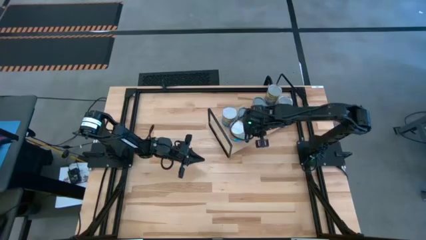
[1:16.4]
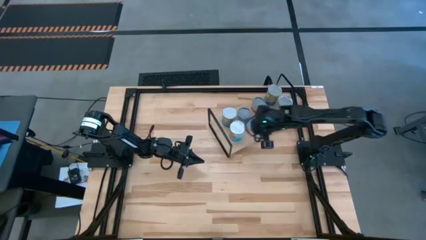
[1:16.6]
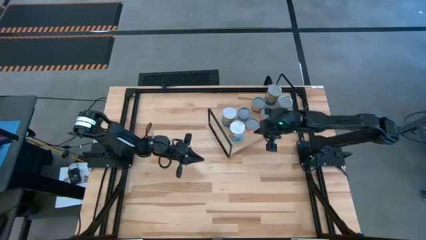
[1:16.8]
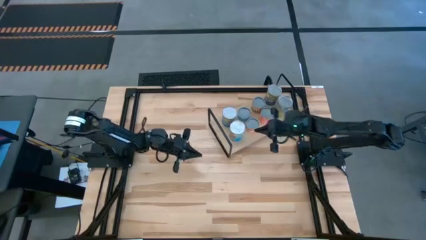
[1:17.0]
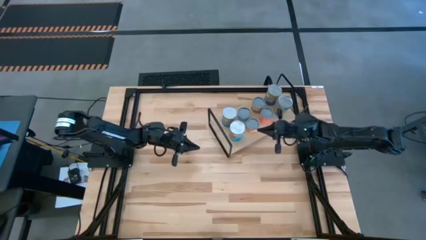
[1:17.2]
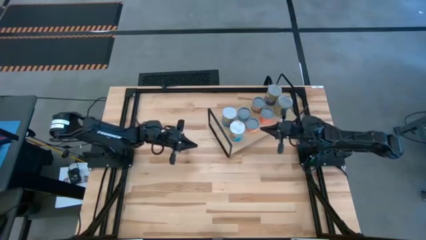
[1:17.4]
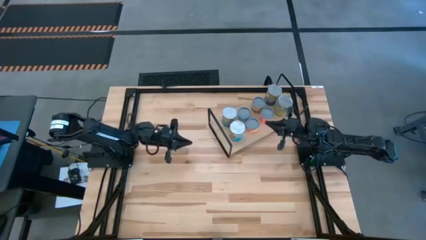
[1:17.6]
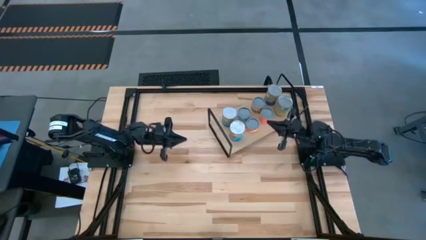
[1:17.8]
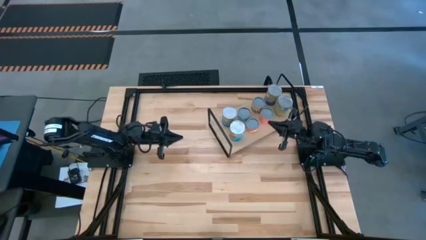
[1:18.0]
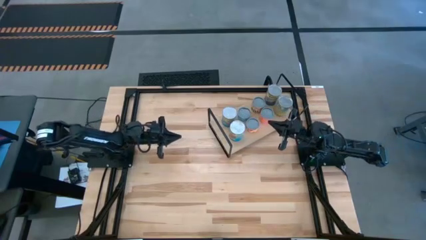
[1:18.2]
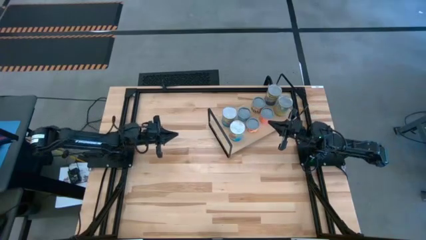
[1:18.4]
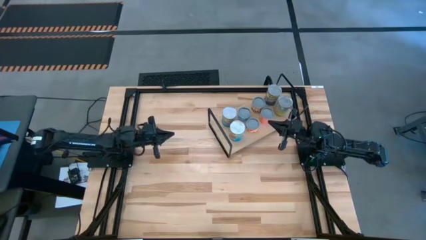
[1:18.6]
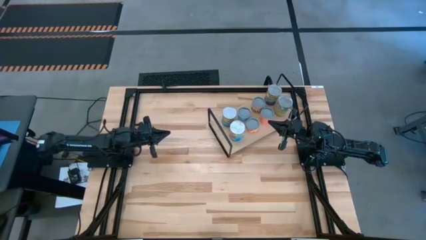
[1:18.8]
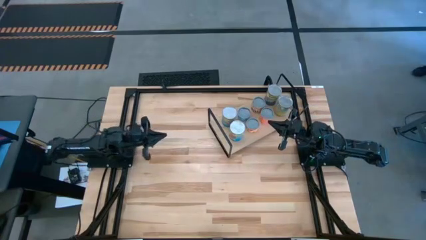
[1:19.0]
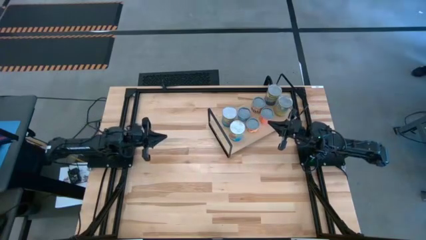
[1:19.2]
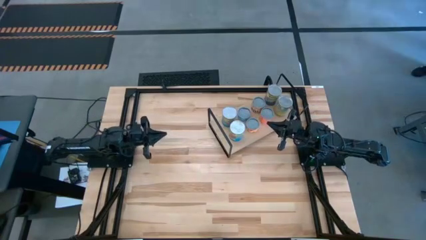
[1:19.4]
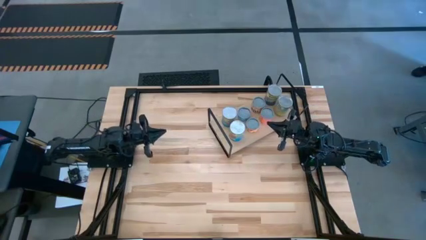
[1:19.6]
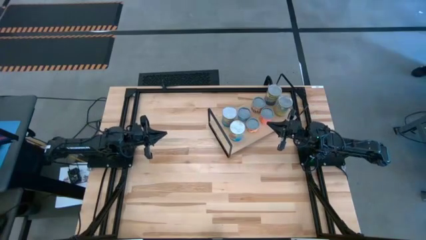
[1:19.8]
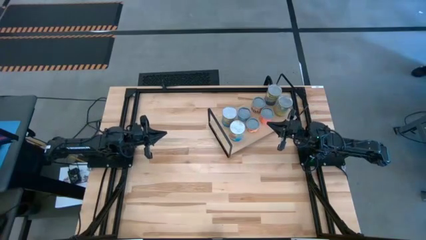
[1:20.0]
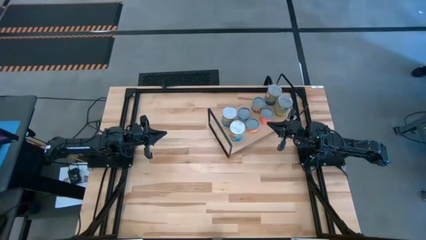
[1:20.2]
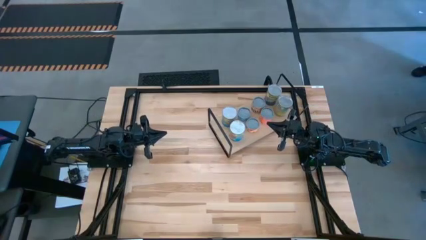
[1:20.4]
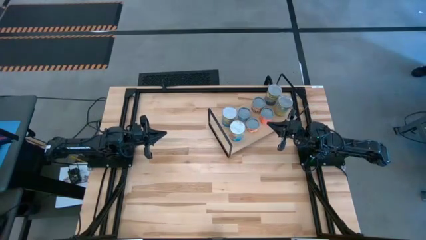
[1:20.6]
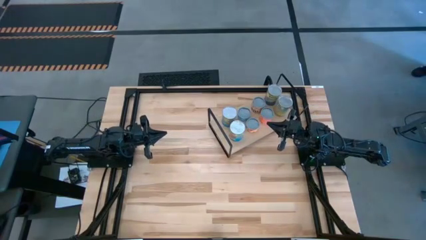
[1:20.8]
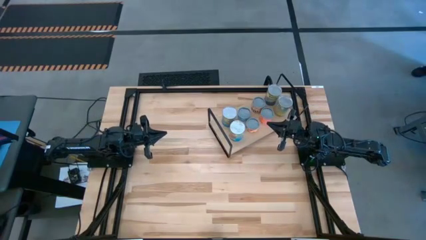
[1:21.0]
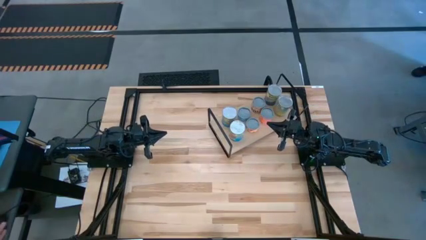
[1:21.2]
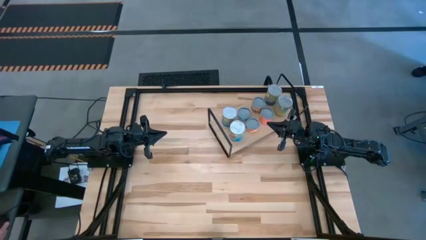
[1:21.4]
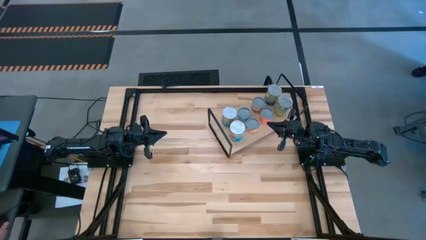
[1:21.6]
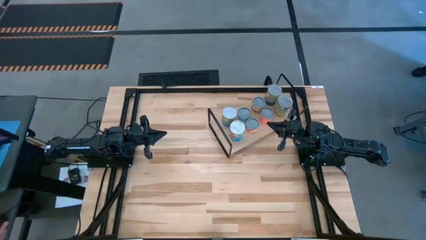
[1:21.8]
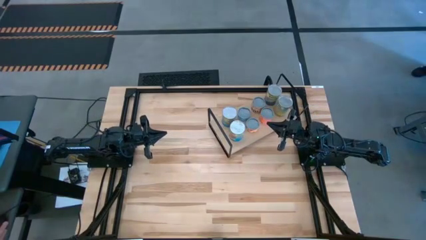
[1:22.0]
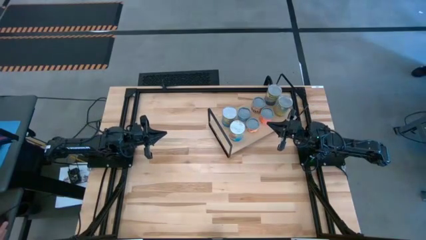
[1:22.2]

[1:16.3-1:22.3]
Task: Pick and place cans onto a shelf
Return to Home Position

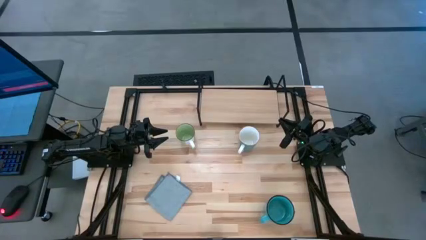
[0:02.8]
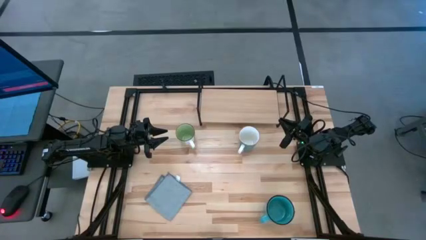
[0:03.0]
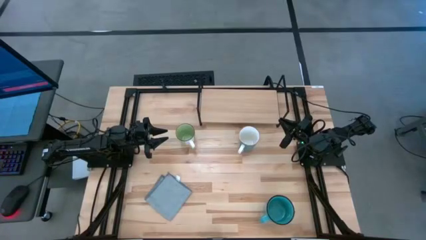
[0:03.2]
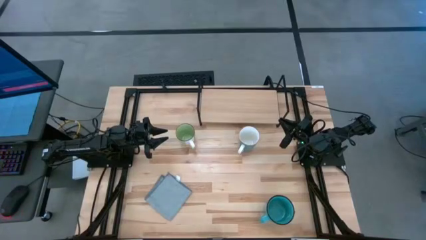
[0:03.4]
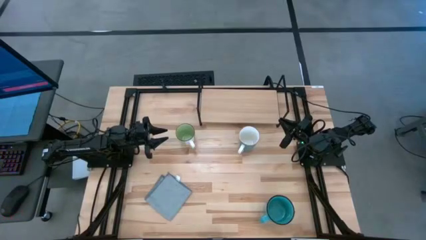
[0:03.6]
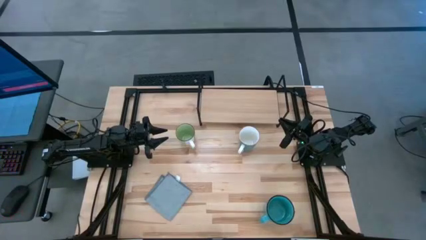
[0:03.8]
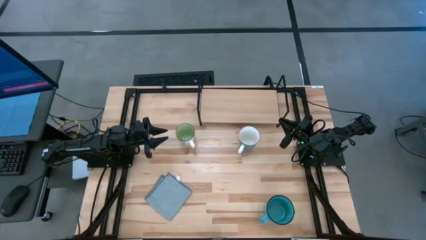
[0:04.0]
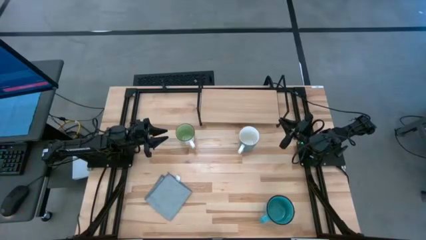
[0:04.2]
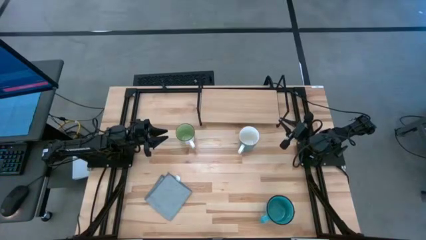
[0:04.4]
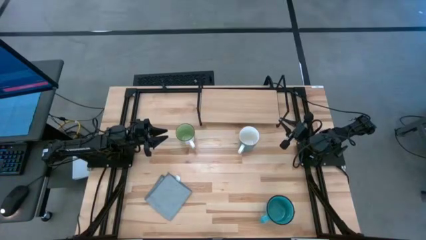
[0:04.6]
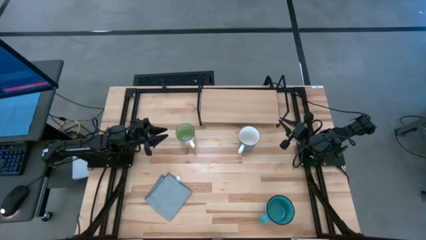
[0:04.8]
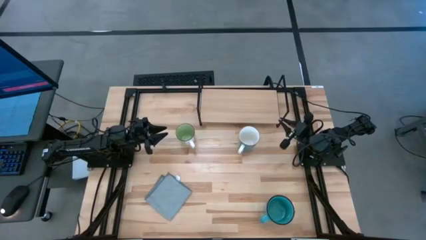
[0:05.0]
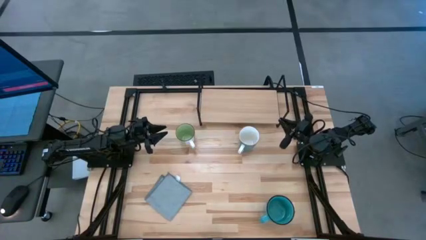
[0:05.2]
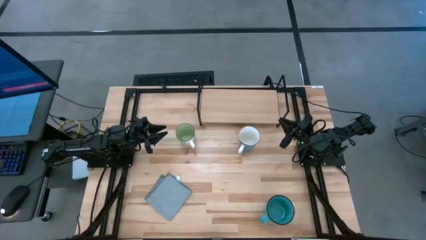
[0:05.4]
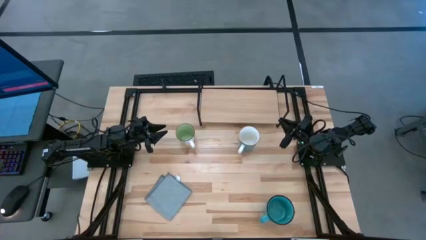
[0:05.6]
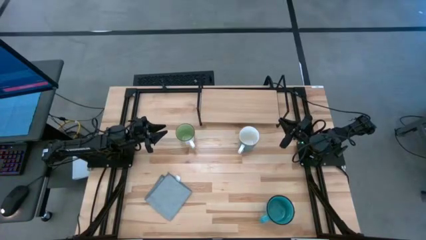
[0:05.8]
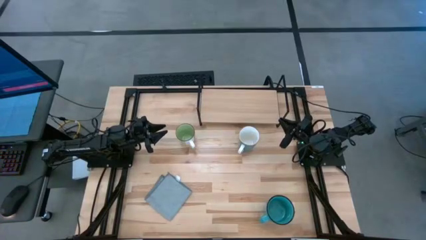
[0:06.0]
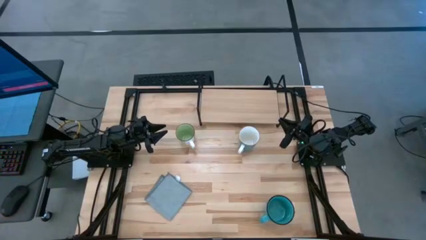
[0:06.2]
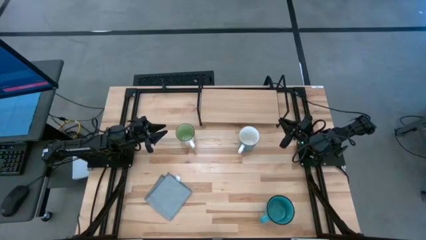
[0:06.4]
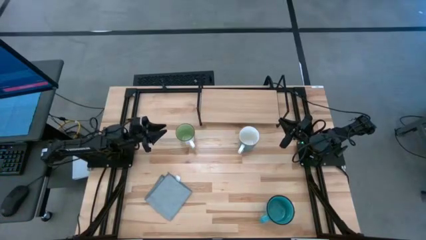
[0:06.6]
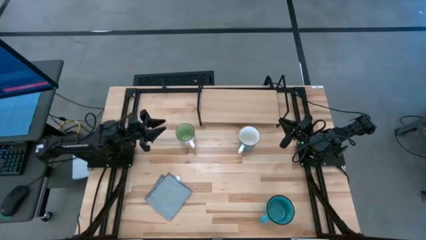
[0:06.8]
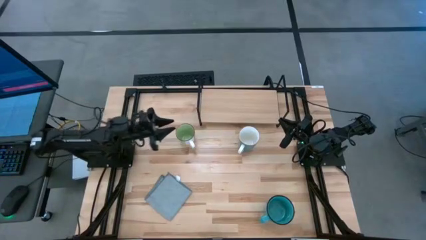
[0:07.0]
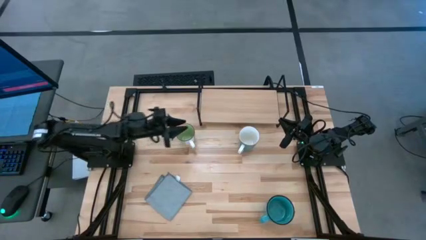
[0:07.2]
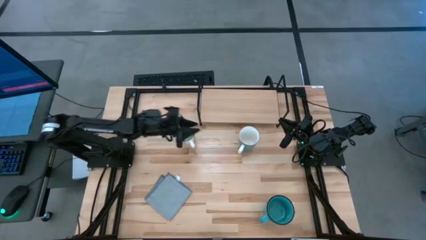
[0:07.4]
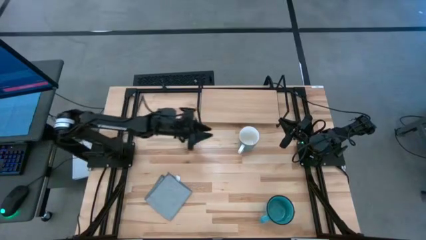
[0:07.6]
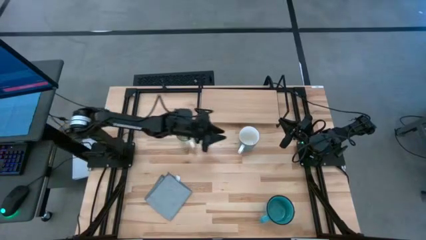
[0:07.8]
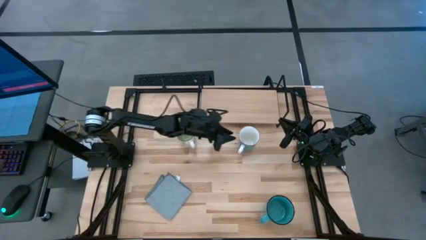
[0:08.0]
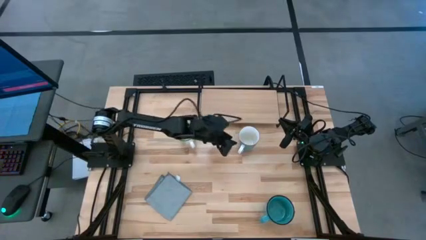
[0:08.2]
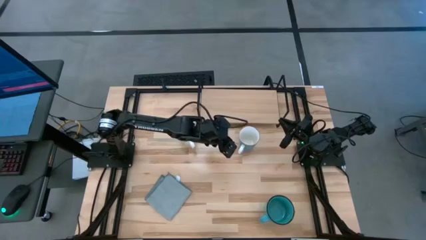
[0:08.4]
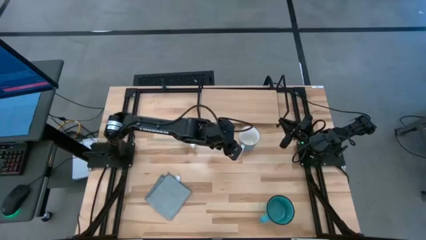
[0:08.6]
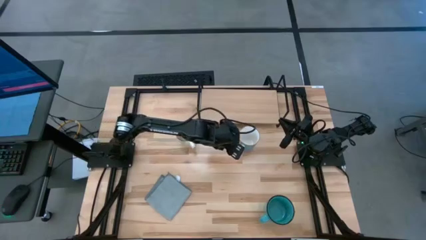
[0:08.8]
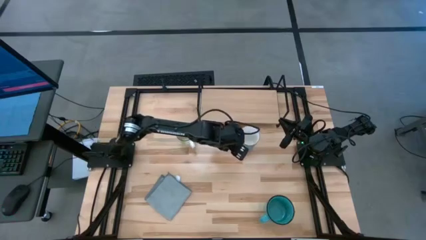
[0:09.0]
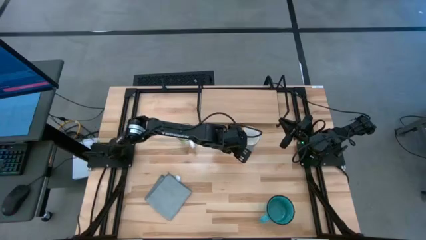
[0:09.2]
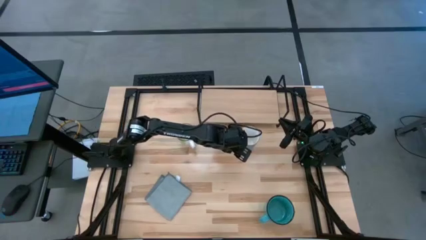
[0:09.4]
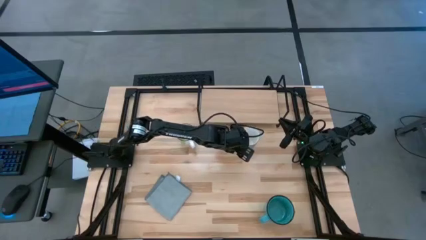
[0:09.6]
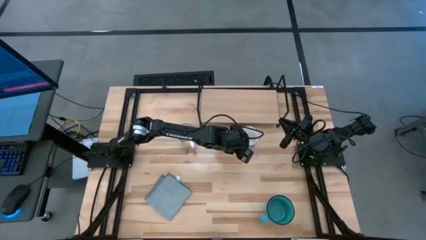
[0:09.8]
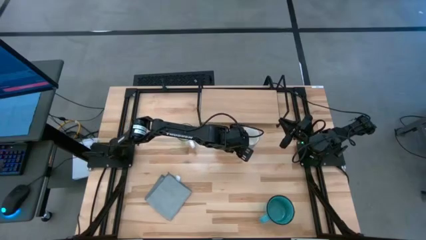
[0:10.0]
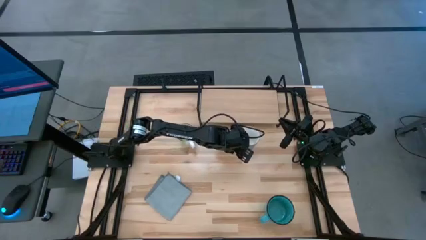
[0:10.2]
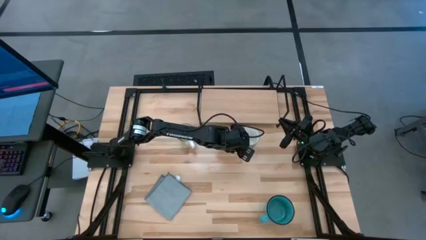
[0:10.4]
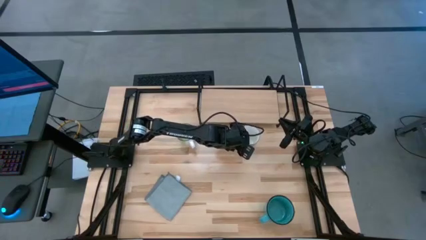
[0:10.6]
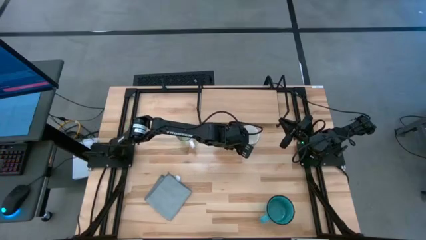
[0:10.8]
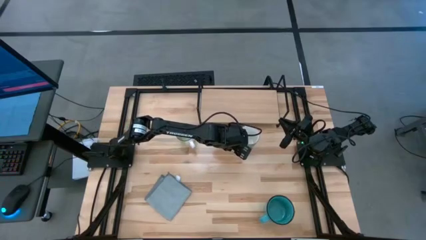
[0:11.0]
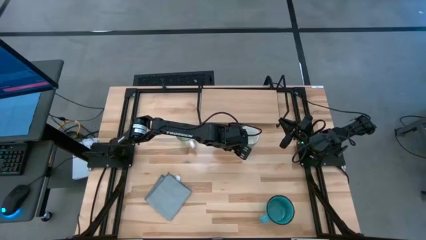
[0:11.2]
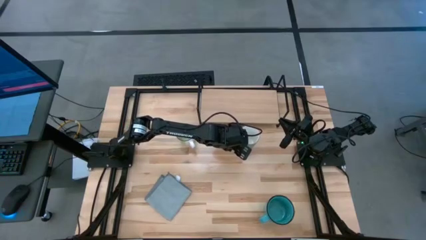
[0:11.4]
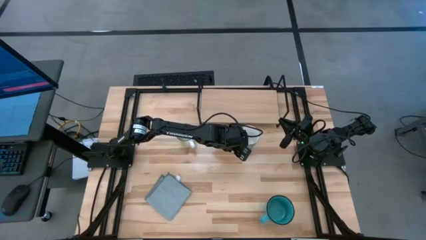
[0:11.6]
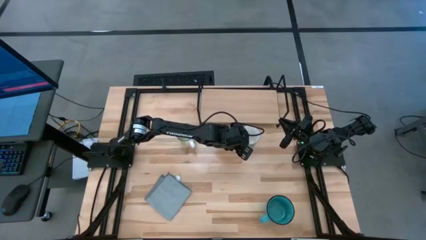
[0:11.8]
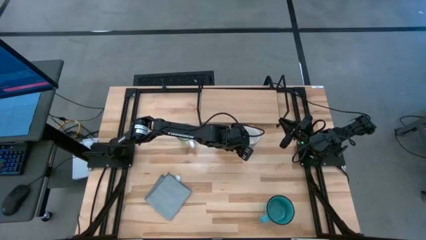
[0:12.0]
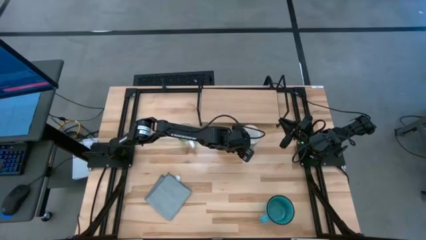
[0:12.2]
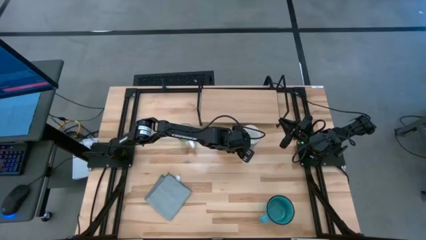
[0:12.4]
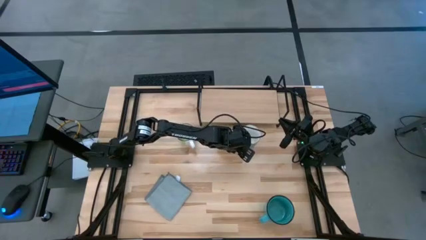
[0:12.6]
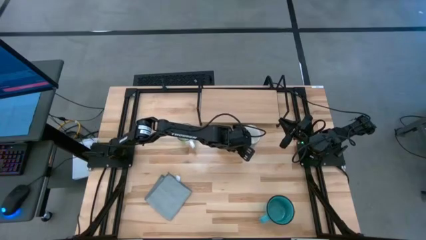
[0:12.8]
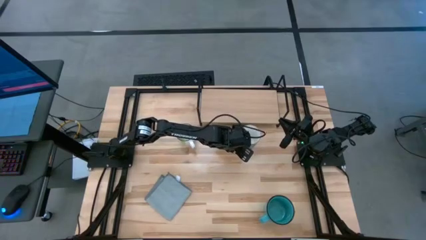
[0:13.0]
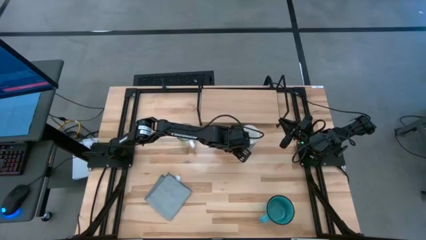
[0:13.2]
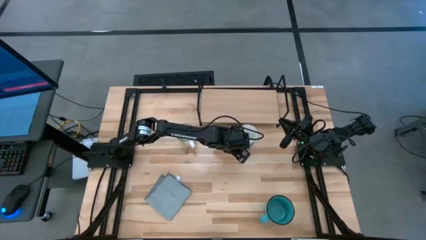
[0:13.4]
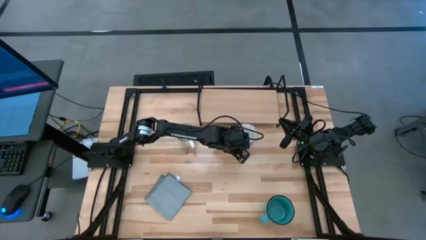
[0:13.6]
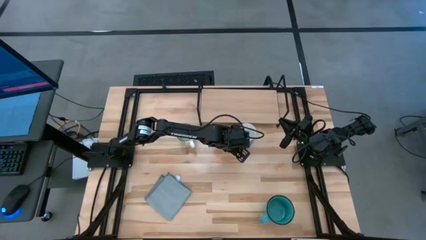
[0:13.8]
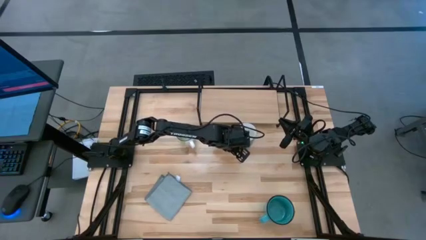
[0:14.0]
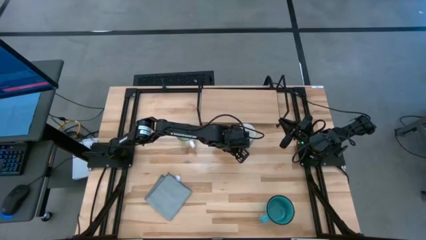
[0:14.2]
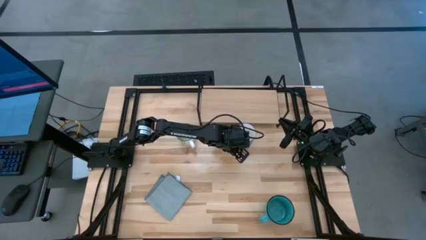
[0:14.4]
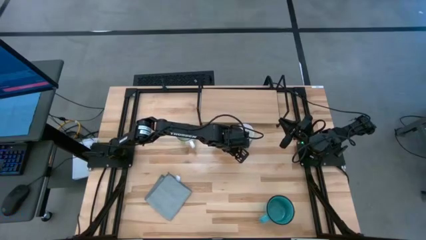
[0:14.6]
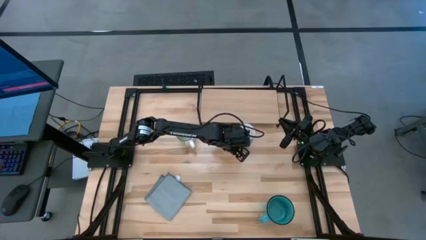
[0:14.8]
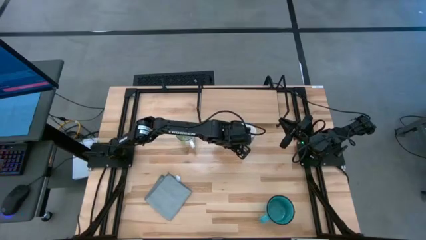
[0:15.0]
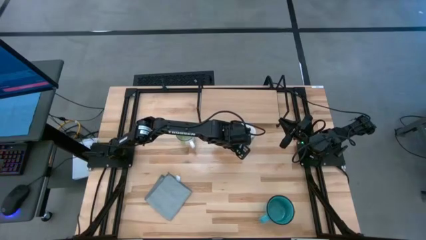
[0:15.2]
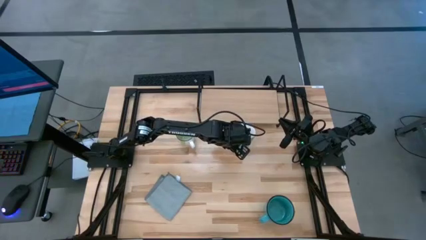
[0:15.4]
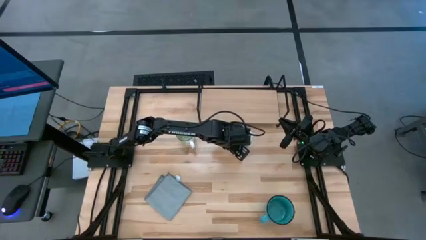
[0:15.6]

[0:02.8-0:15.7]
Task: Stack small to large cups/mugs on shelf
Put the light blue mug on the shelf
